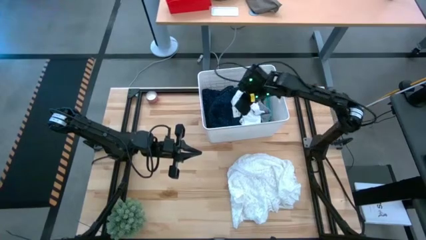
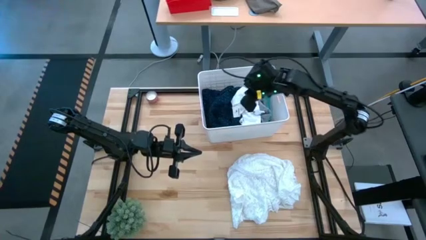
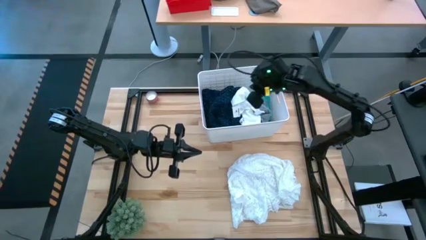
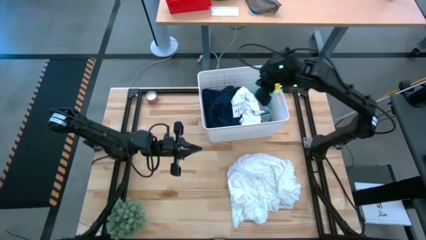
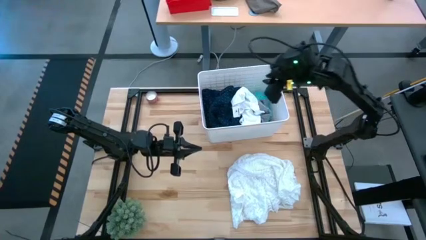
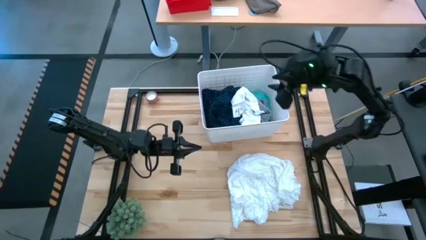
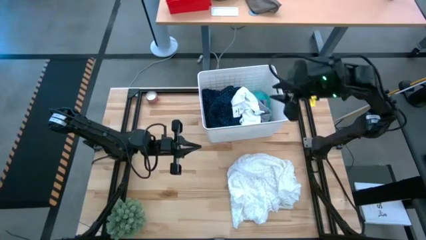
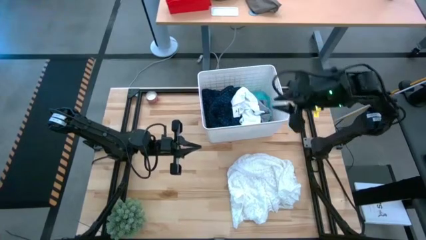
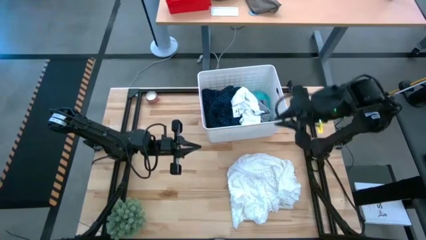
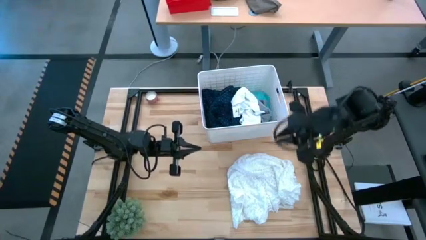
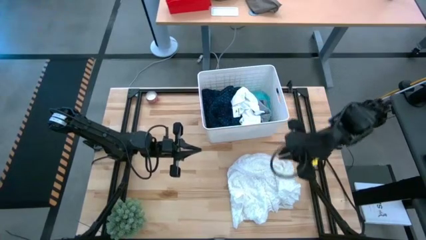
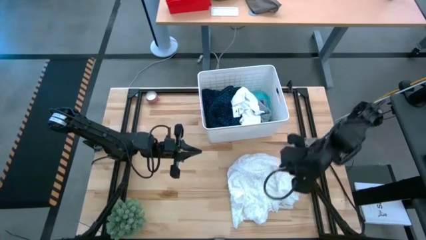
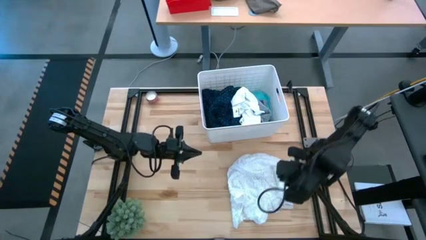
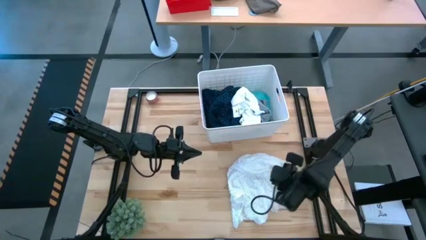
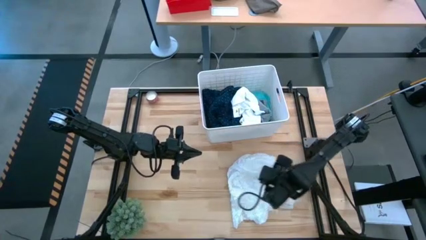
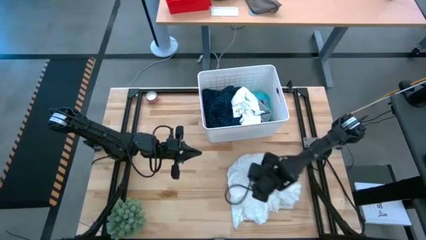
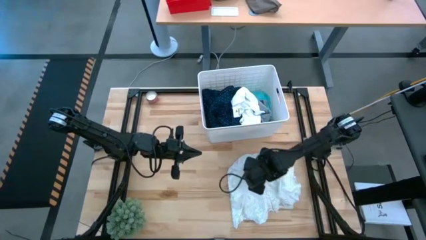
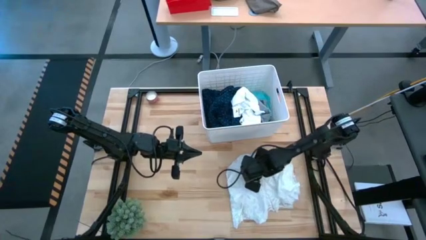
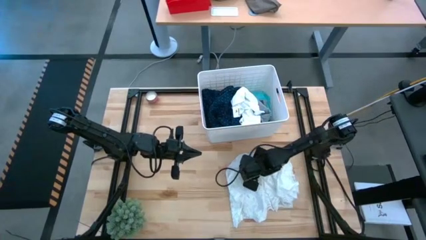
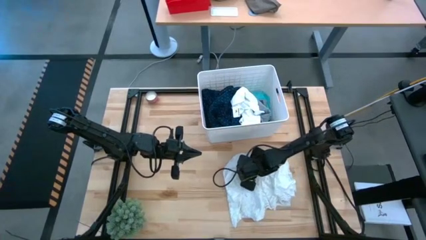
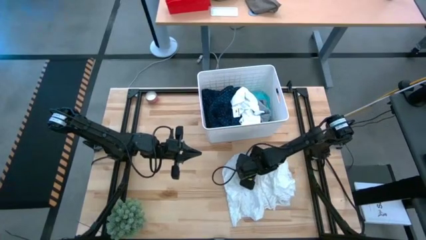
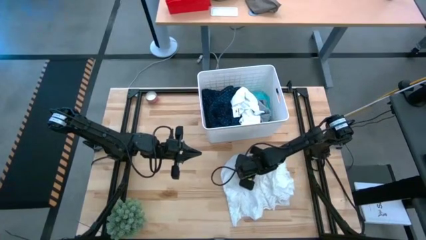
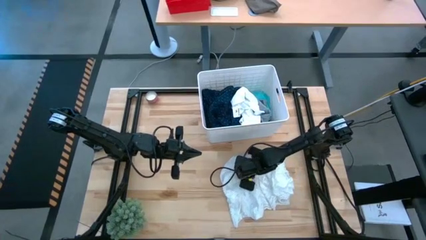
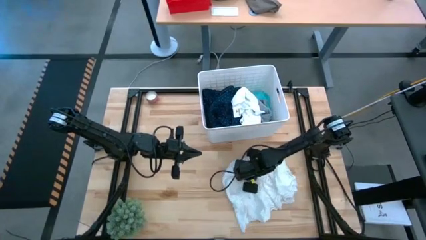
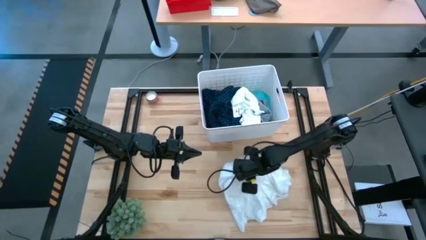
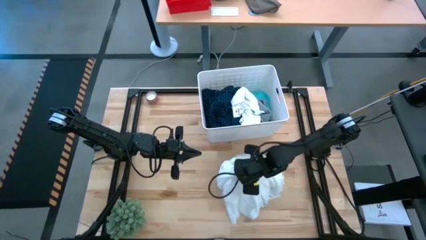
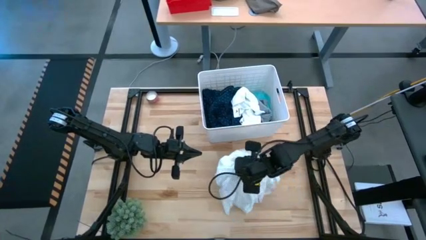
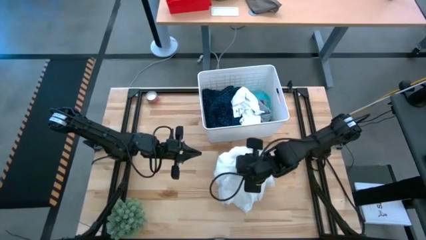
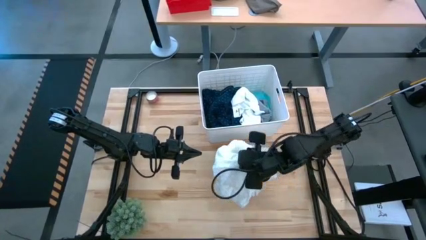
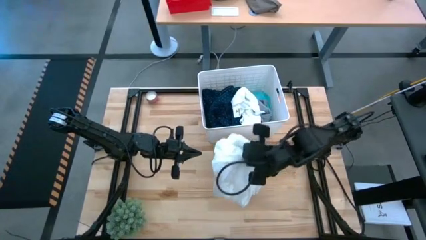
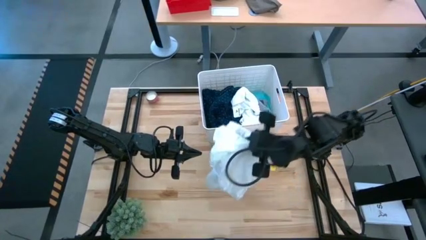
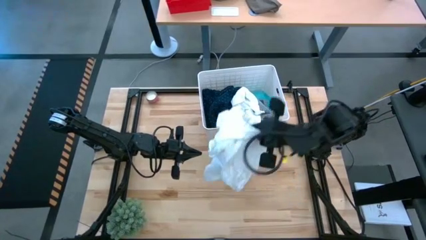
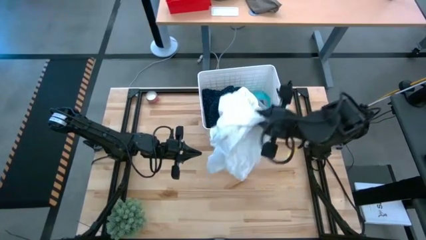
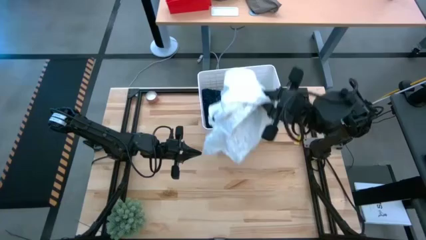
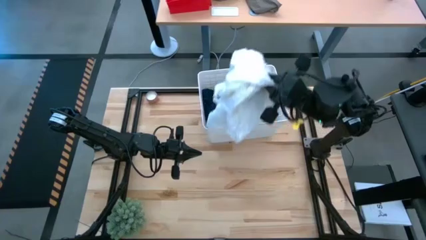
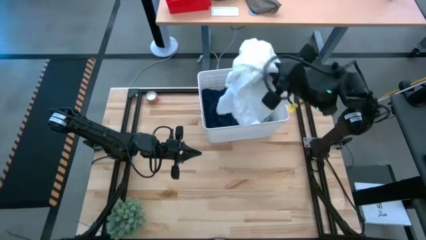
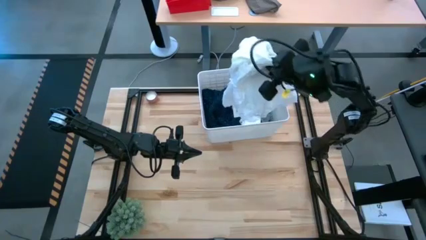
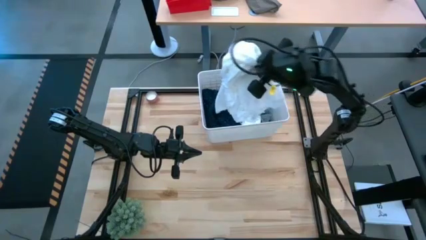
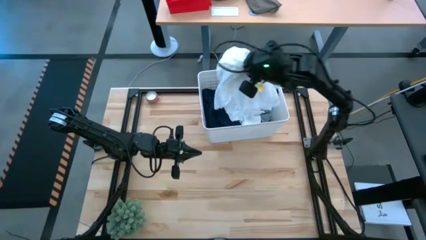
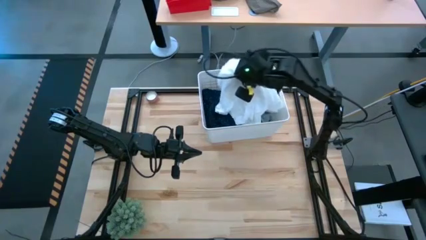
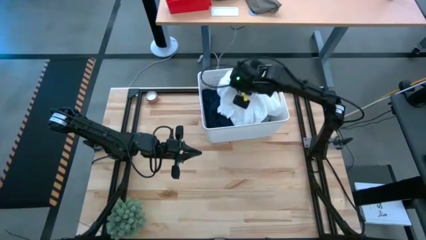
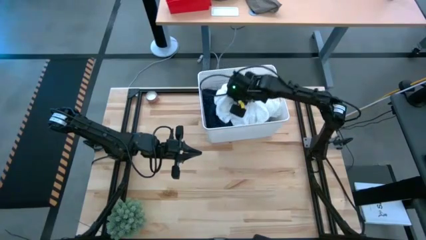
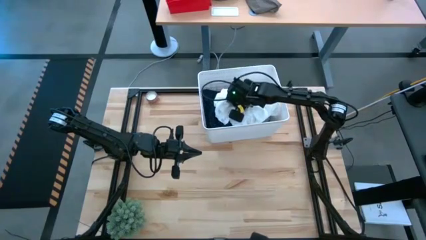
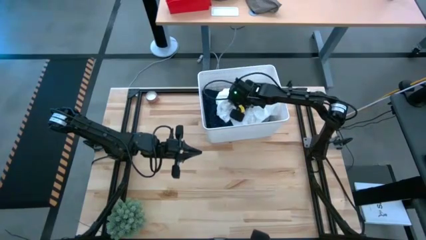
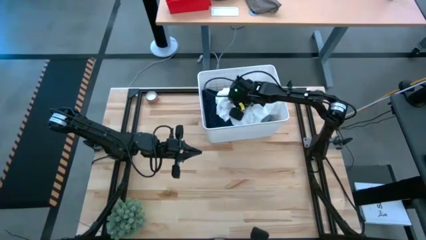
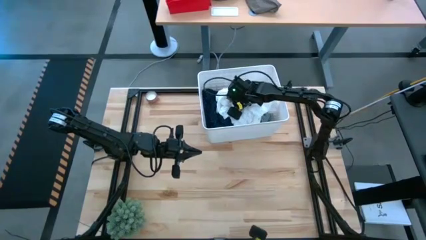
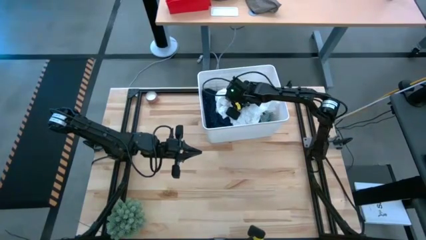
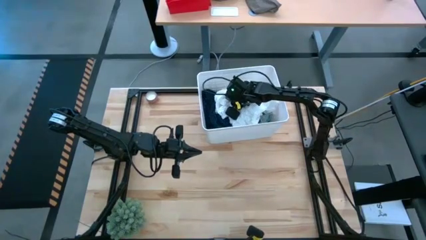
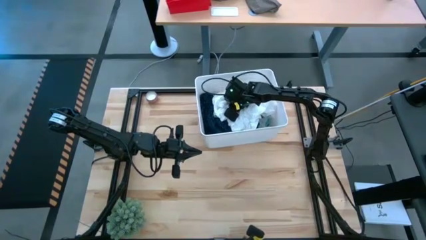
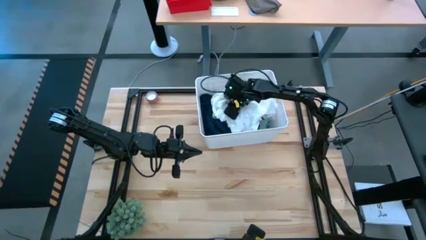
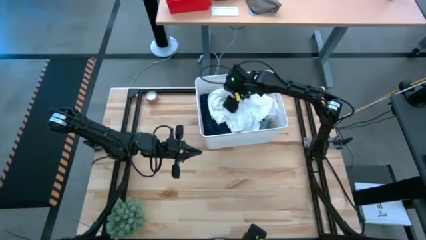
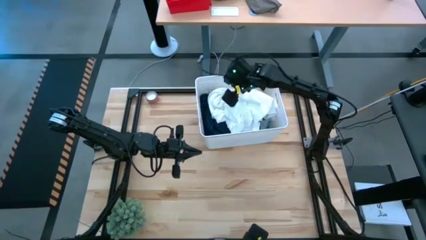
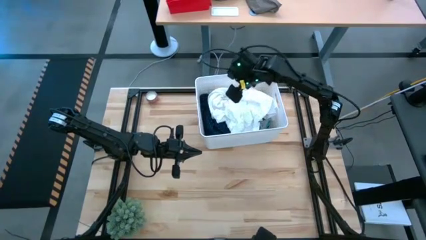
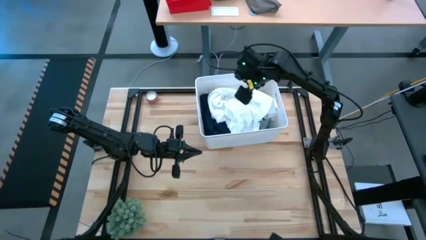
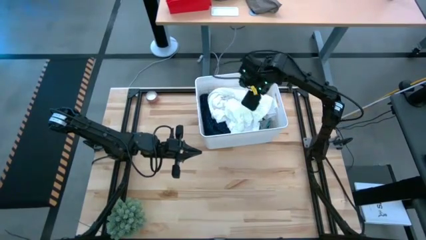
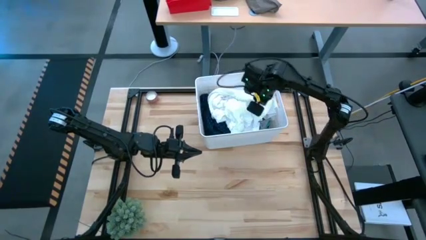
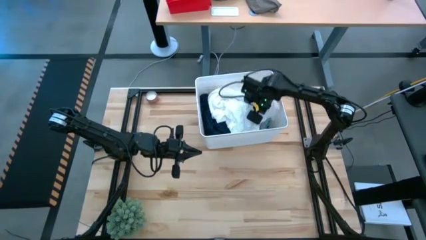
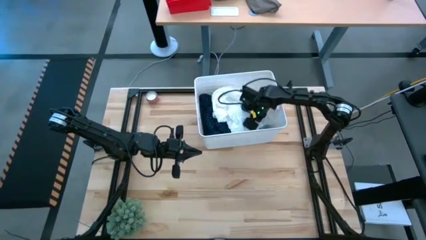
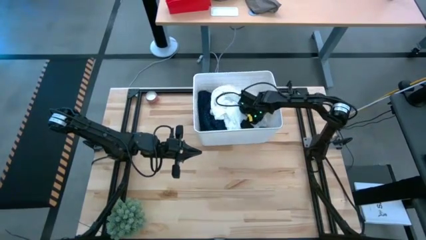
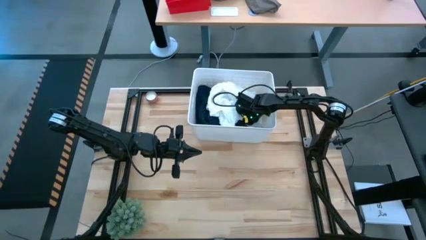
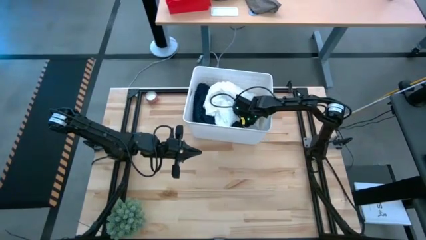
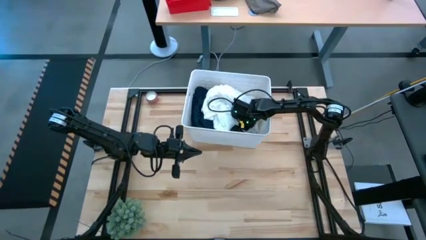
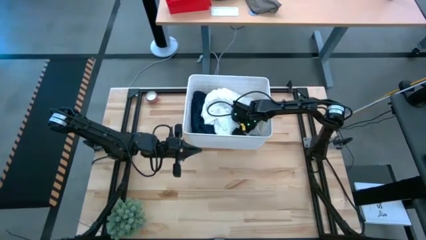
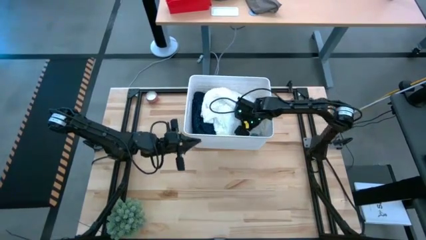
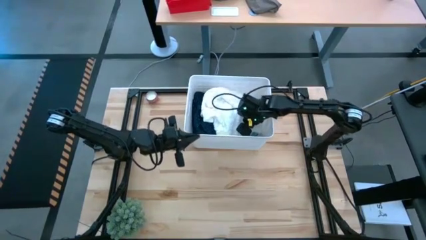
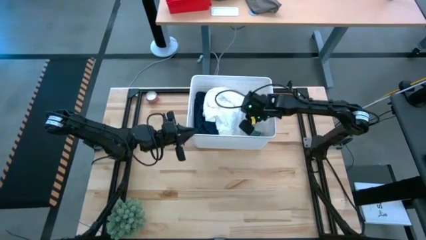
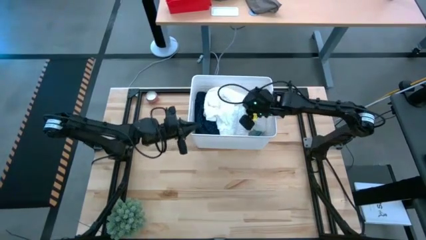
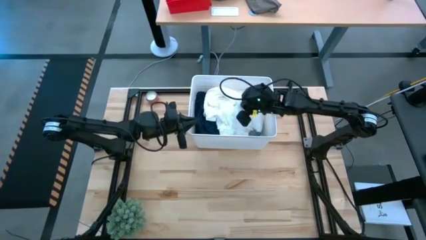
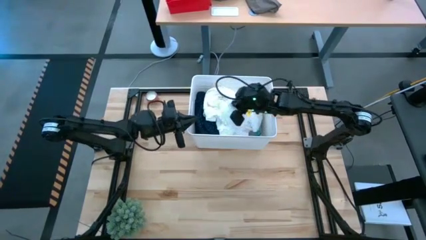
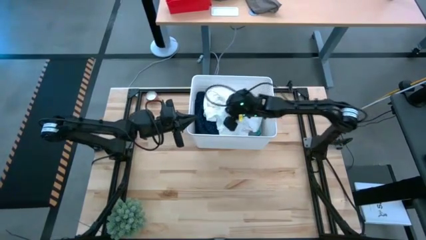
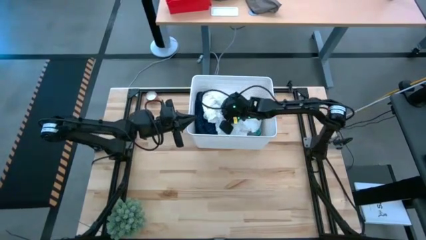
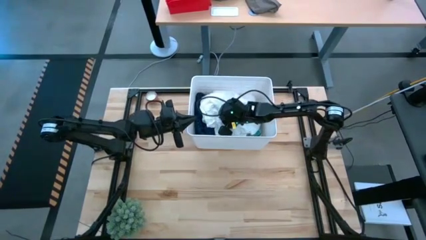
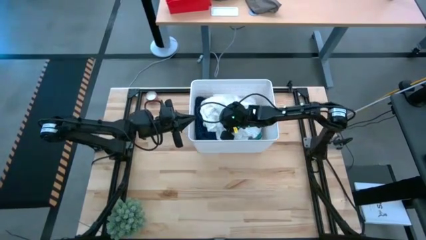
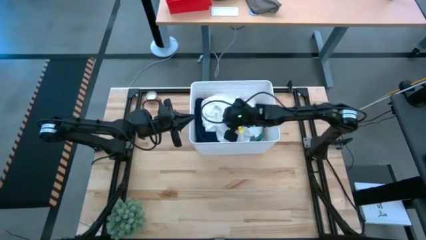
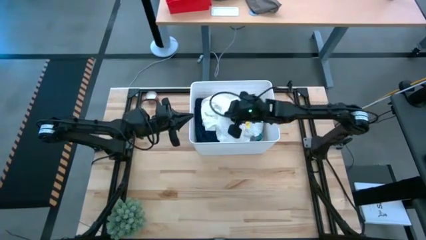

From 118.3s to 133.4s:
Task: Sort clothes
Put the white blouse in the bin

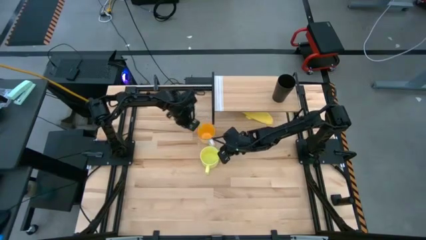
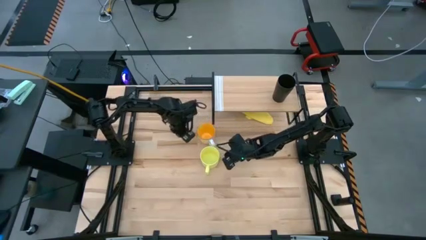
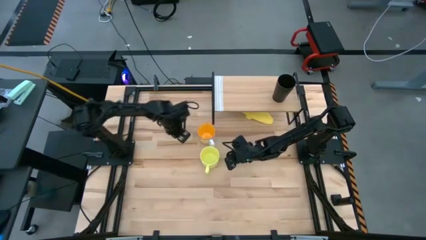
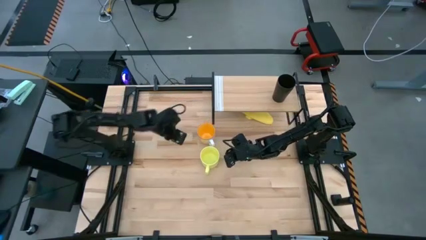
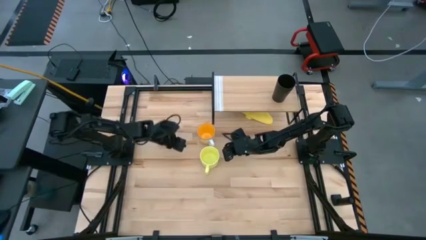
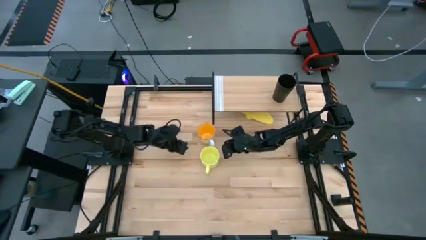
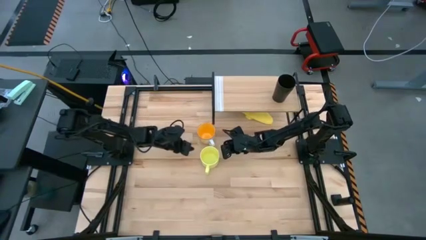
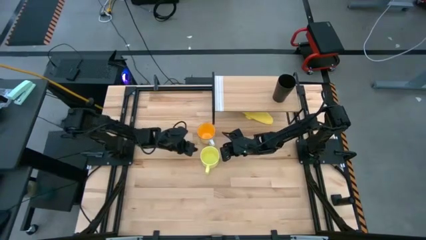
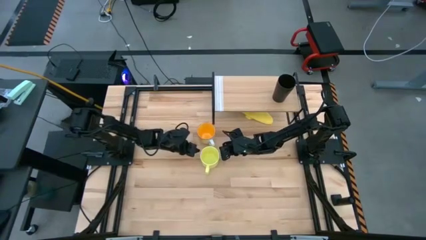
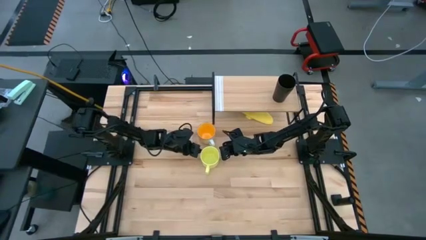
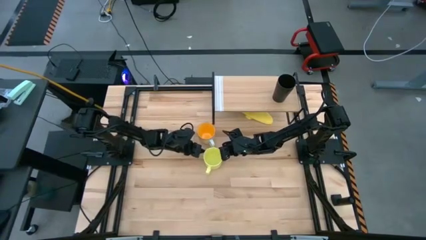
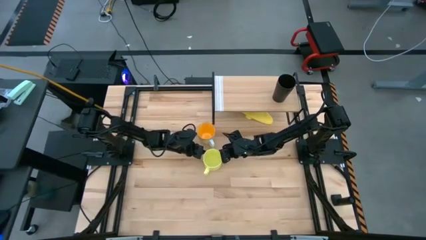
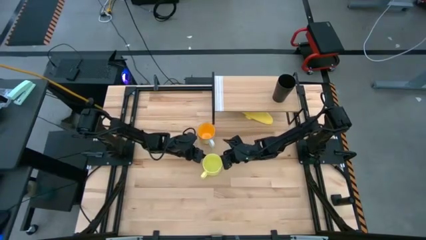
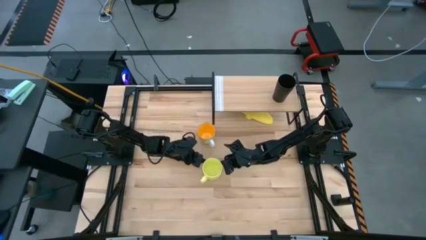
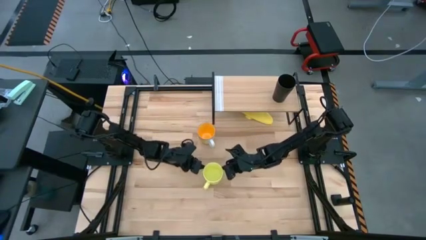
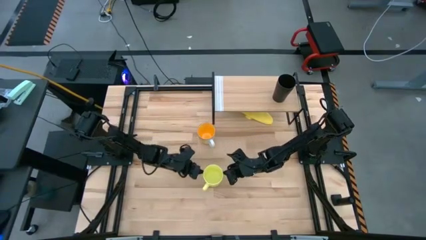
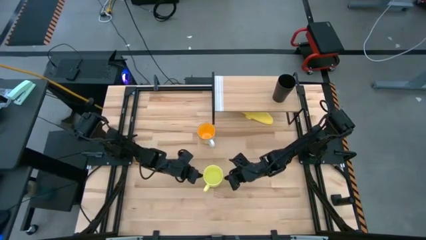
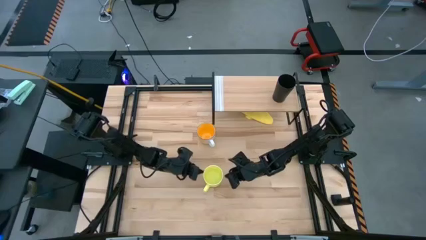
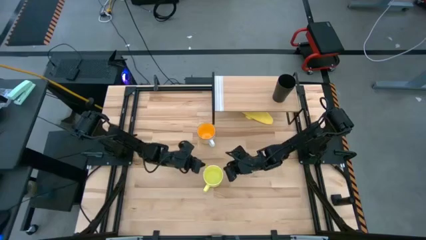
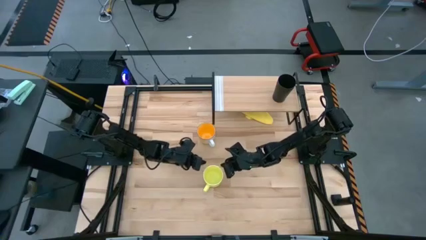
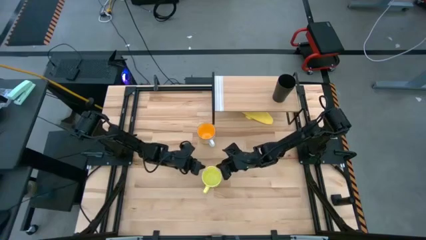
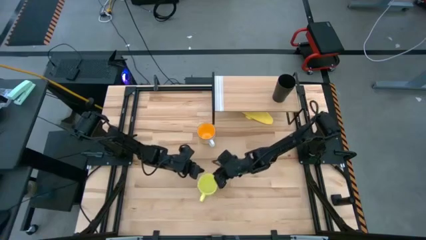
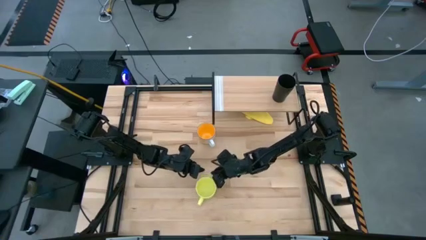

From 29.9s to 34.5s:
Task: Stack small to large cups/mugs on shelf
Move the yellow mug to the bottom of the table
